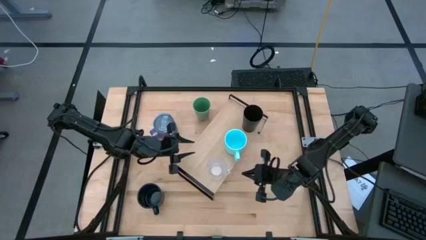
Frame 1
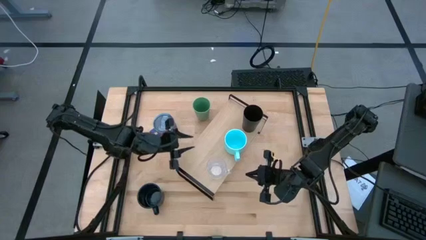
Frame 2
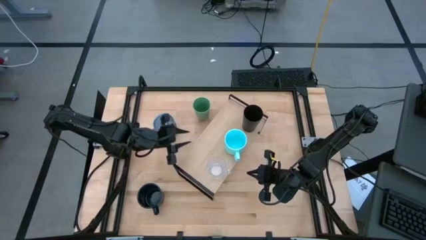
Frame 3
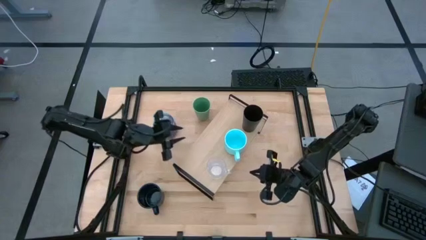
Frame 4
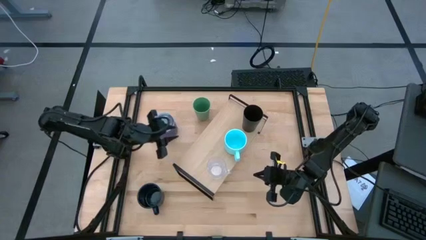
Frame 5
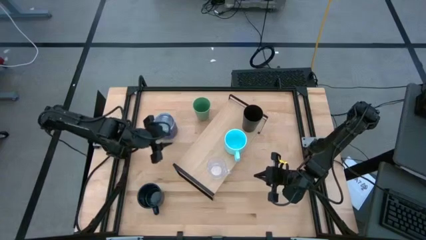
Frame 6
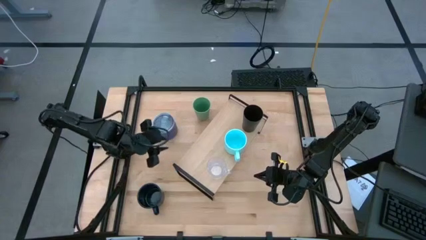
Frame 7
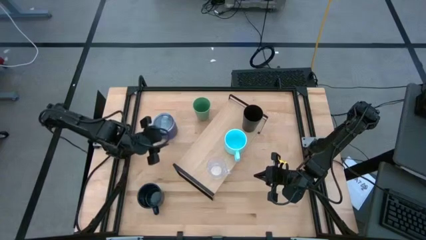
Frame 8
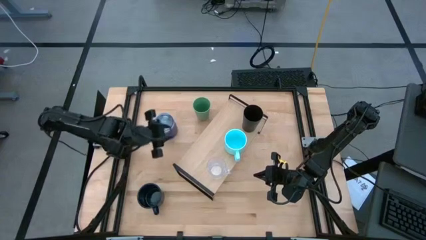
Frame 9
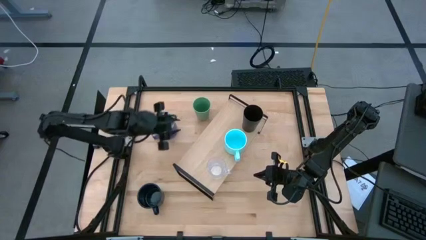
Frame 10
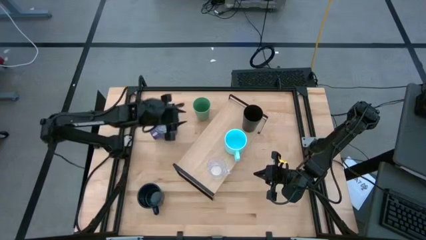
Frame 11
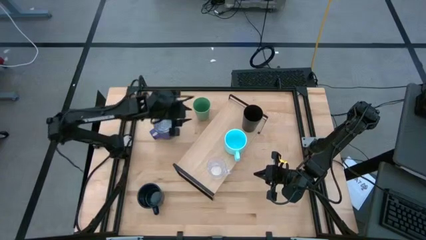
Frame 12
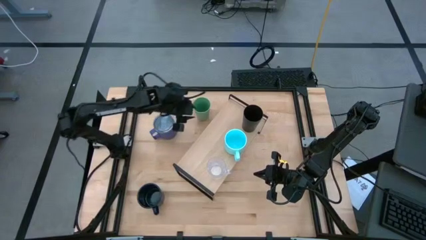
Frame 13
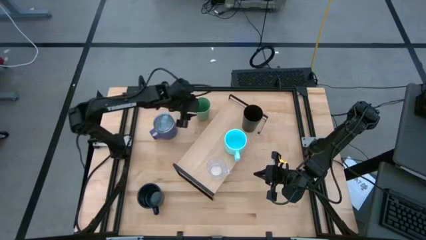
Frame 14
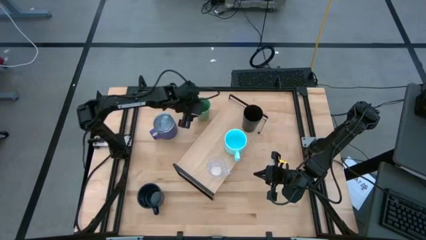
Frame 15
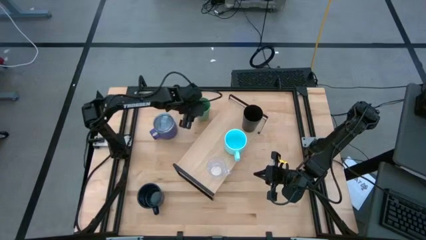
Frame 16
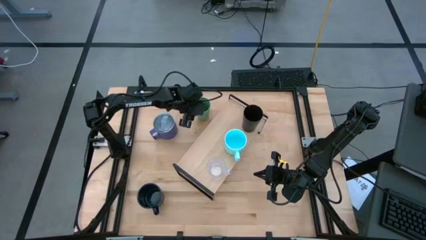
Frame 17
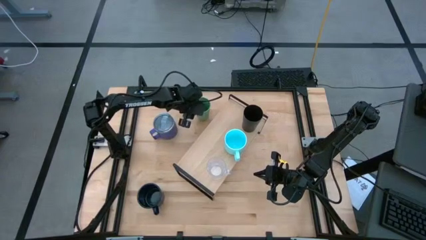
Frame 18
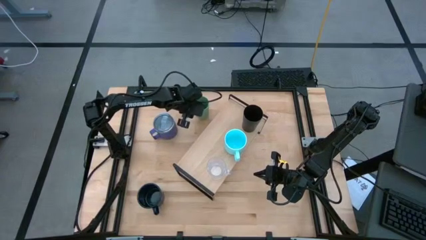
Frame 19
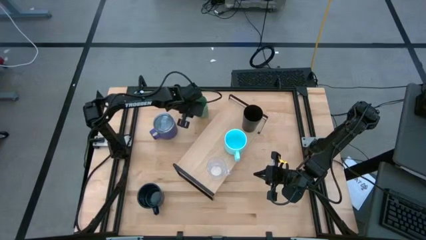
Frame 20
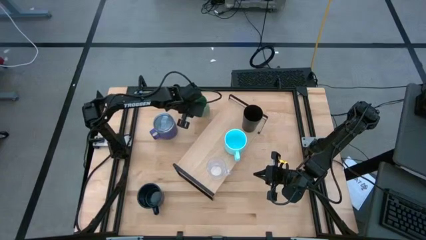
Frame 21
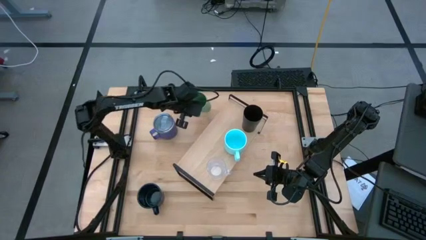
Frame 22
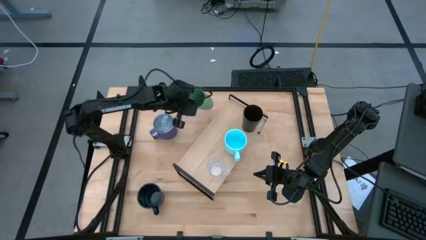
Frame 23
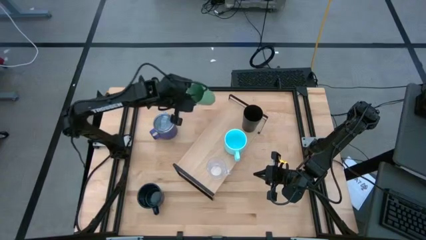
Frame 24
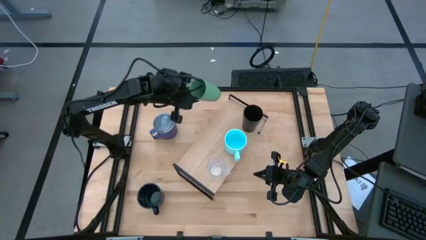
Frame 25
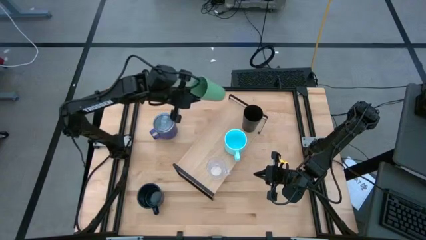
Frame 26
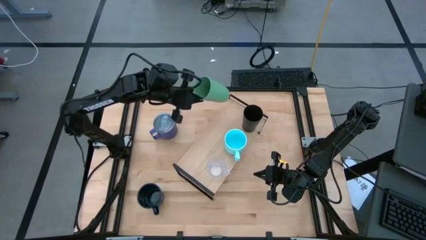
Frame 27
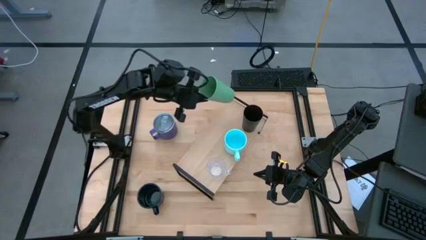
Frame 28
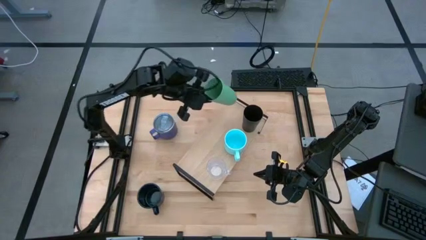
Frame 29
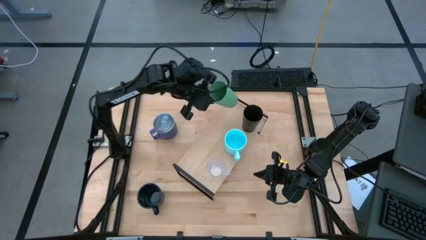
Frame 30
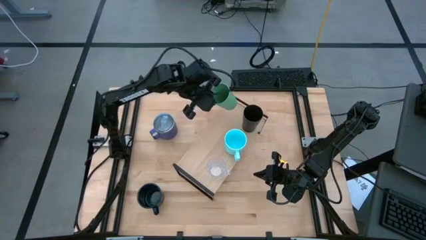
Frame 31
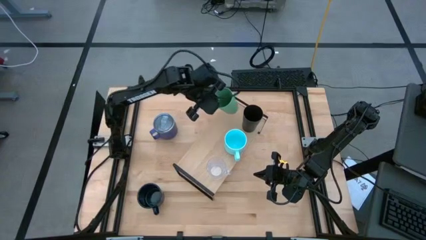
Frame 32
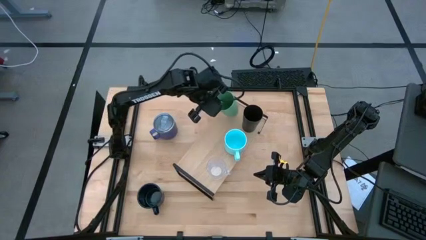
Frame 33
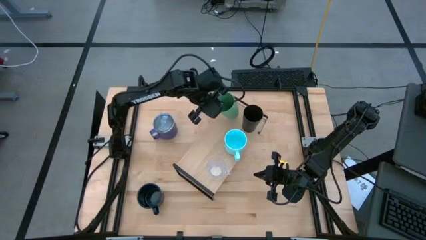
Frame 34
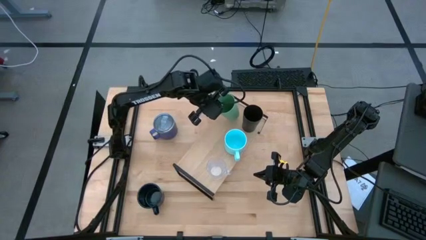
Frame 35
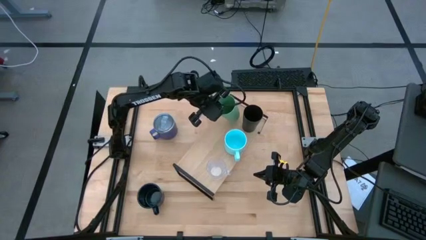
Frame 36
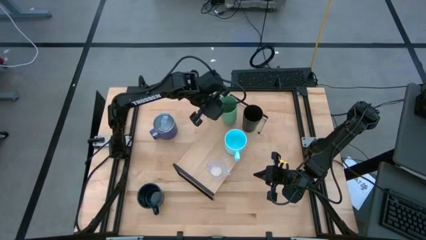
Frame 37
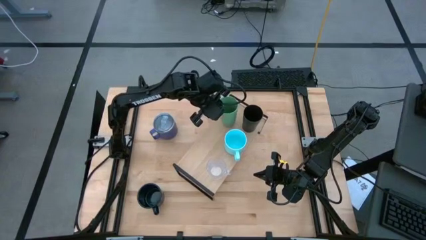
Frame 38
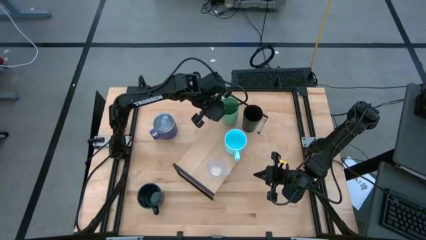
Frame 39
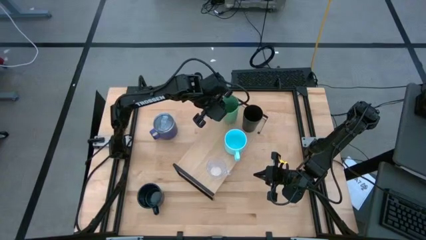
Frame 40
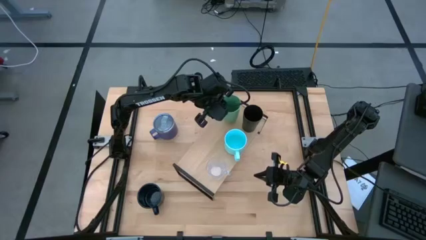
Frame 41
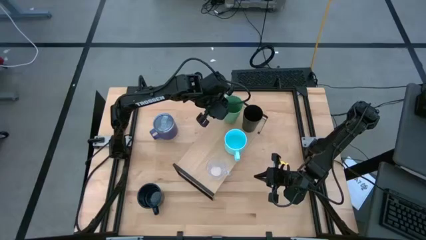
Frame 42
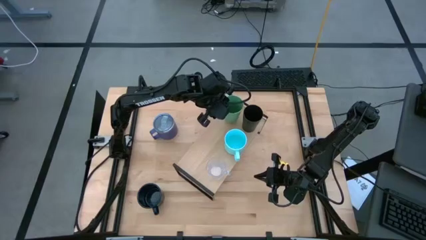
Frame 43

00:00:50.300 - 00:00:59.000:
Task: Stack small to large cups/mugs on shelf
Put the green cup on the shelf

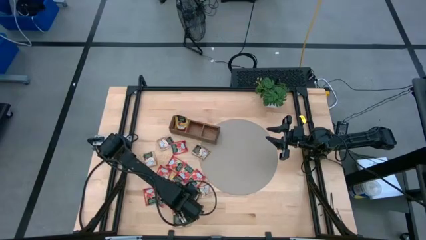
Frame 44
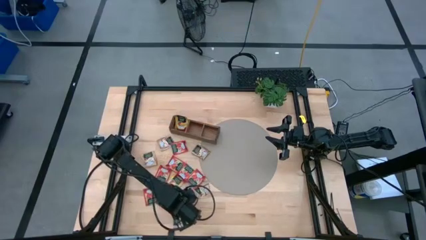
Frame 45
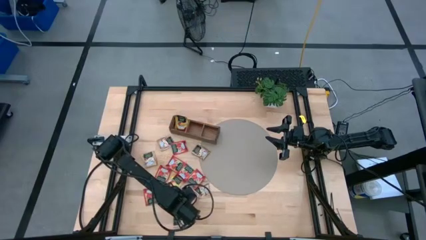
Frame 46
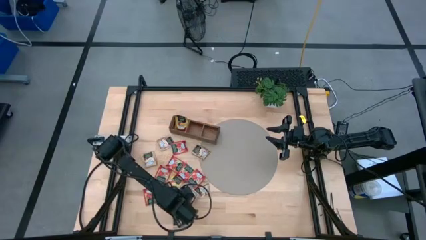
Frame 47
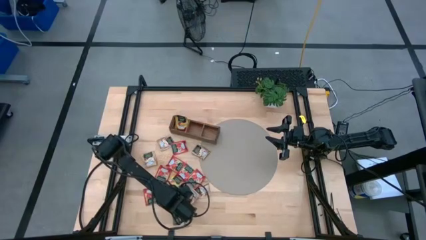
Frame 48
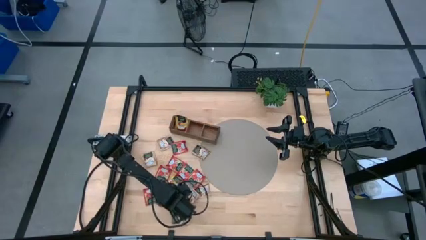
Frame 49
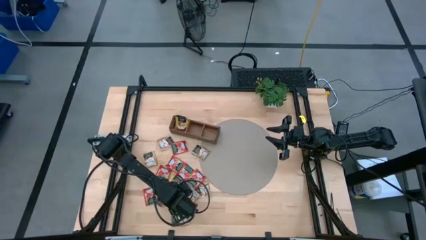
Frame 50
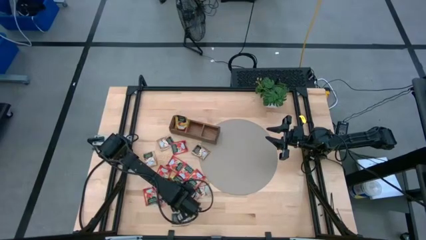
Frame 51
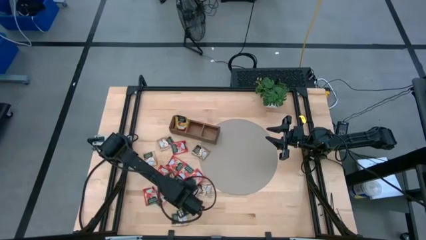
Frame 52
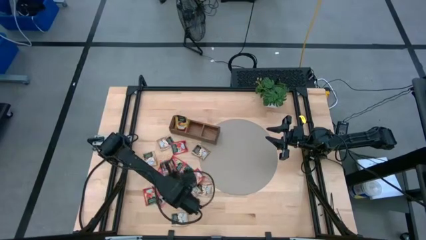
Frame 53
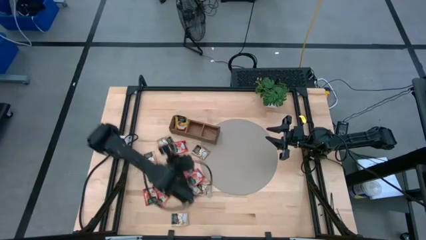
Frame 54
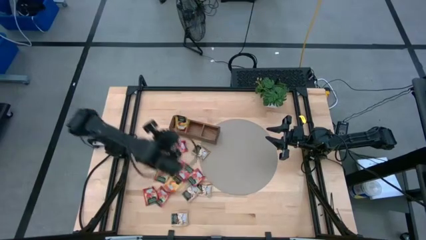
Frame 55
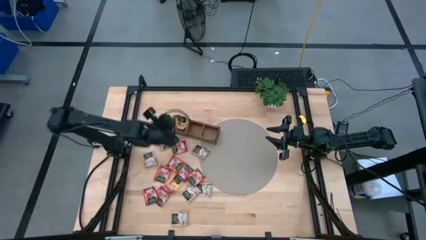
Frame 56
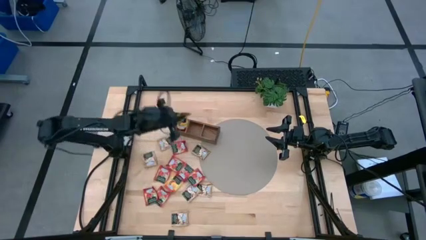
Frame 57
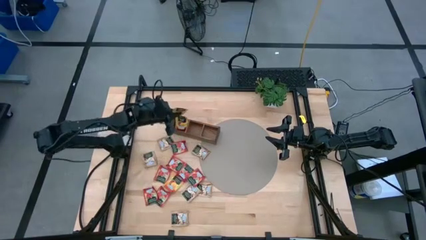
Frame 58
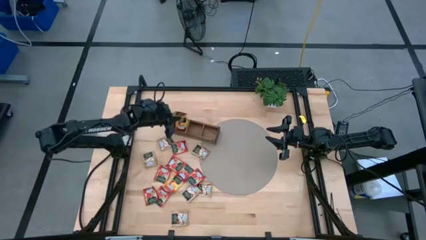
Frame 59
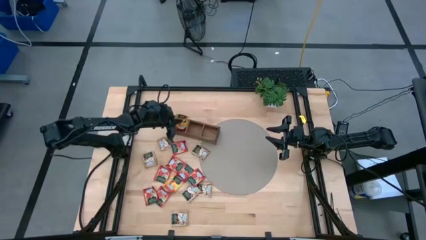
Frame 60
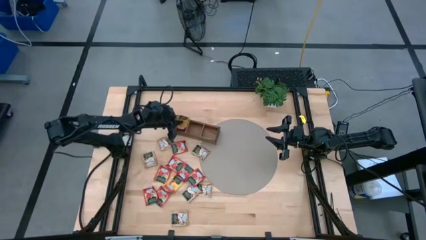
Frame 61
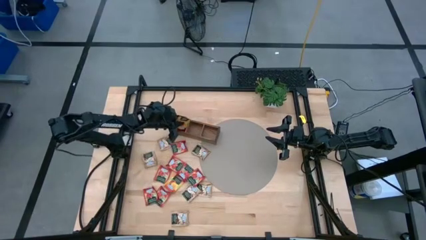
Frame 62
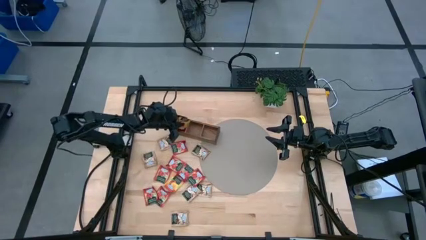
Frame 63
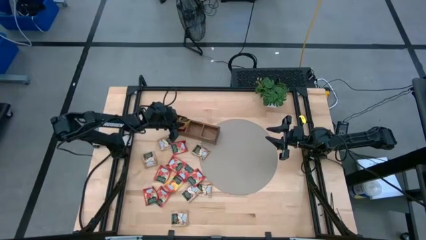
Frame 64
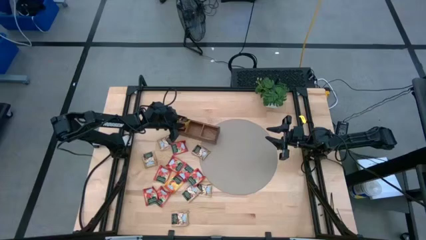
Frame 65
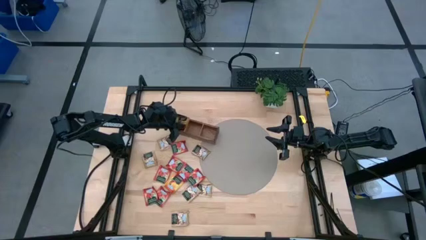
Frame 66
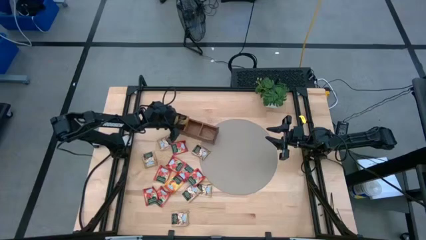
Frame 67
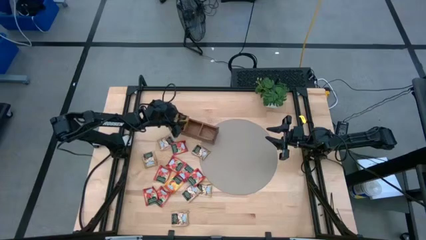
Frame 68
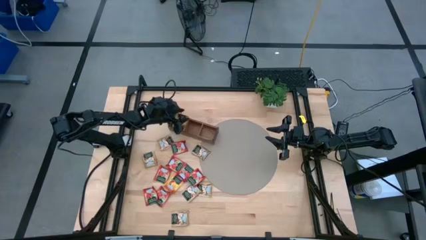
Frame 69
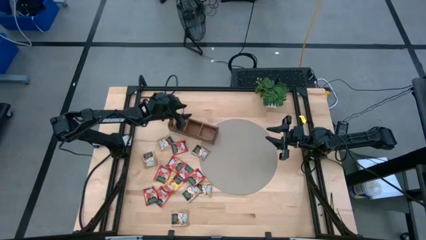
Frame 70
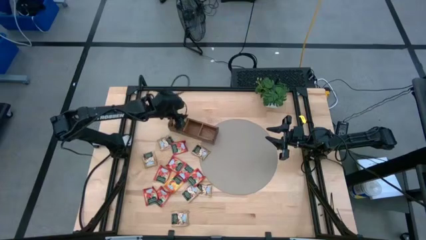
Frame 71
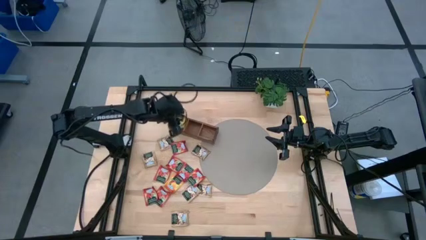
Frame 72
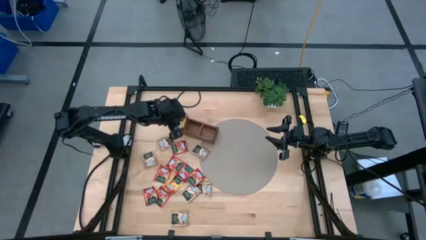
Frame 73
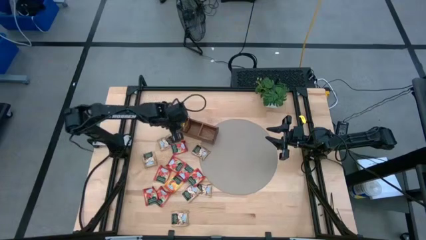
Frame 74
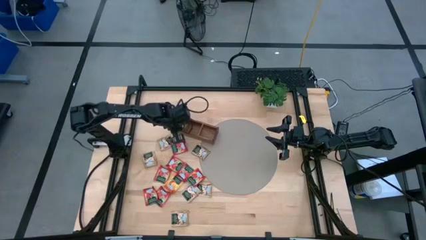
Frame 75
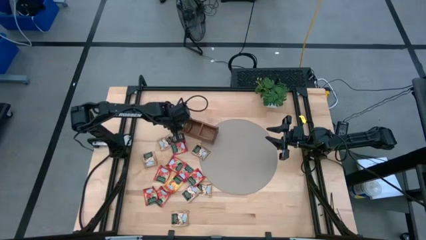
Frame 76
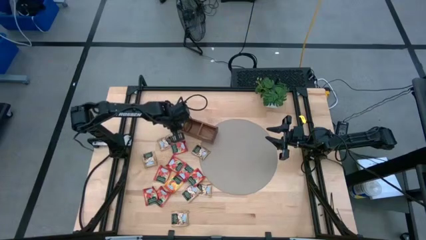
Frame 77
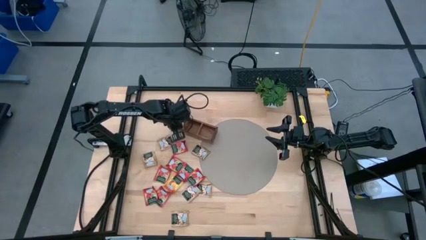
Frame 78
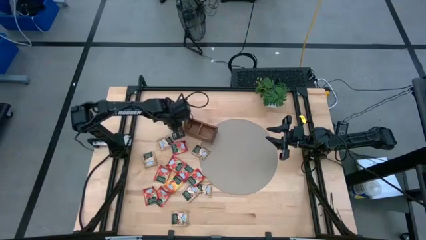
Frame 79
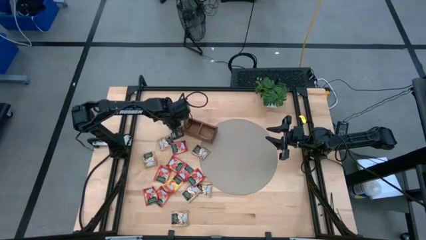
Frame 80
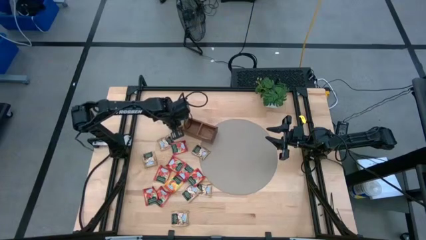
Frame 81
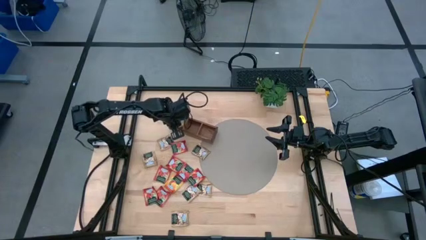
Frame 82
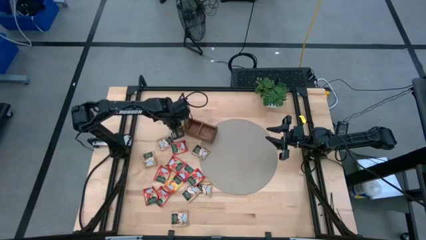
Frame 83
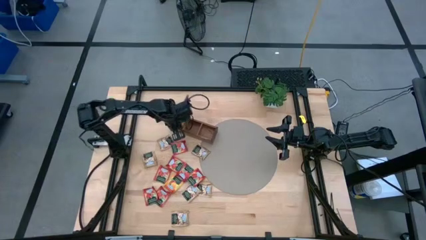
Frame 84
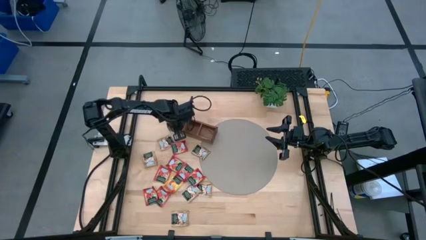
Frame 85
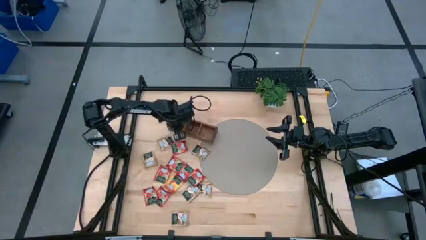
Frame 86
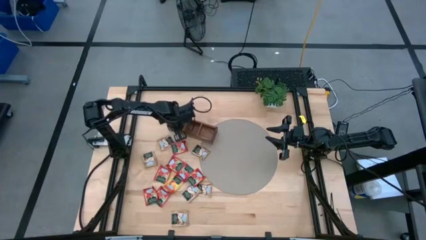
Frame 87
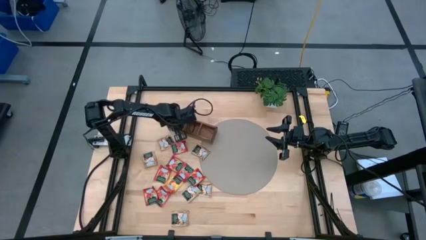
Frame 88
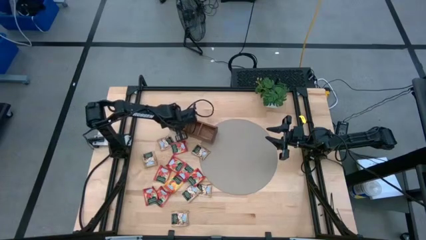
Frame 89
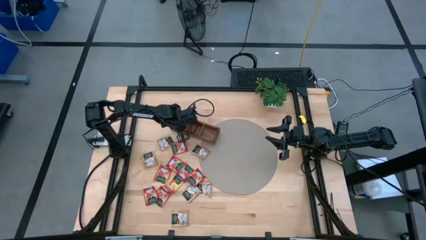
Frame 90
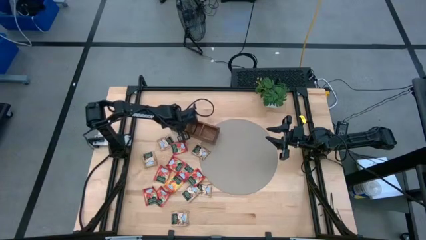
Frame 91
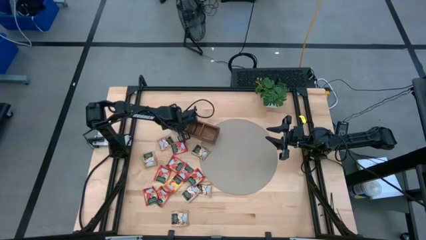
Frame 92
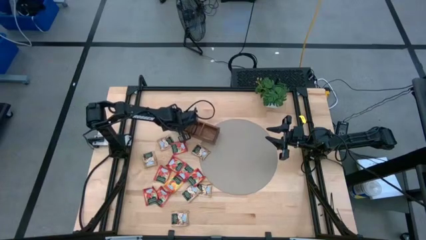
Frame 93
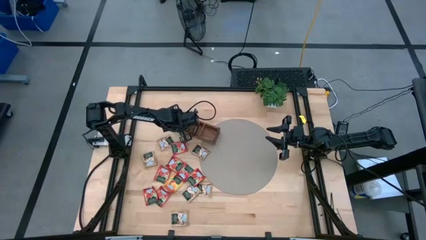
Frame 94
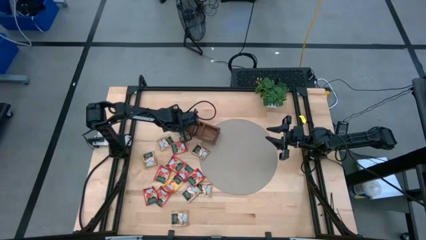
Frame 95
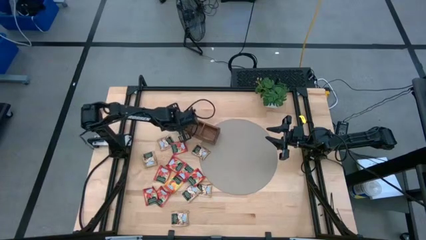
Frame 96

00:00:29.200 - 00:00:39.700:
Task: Pick & Place Tea
Put the yellow tea bag into the left section of the wooden organizer
